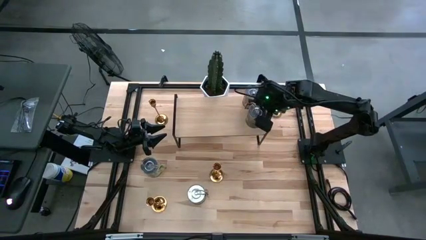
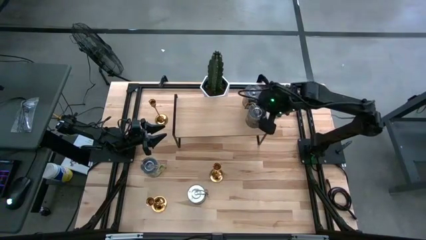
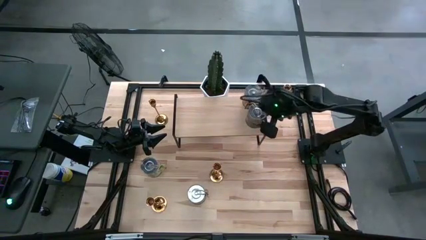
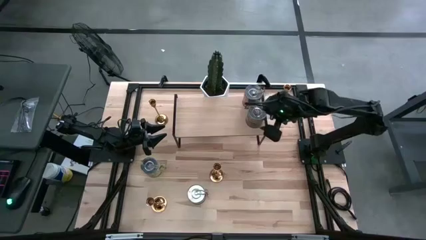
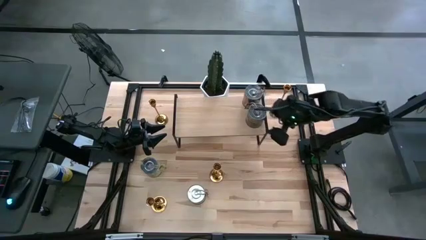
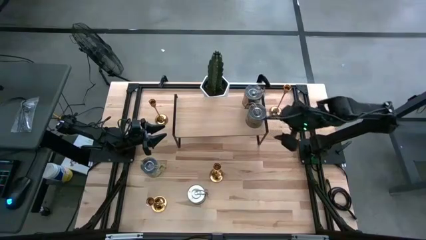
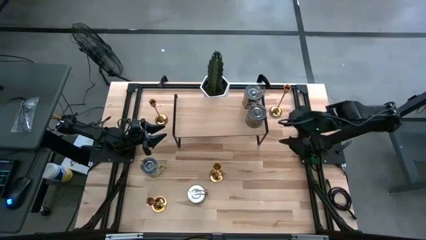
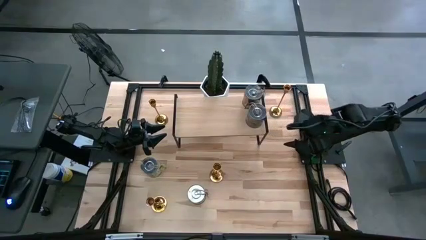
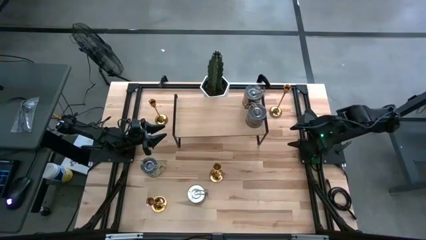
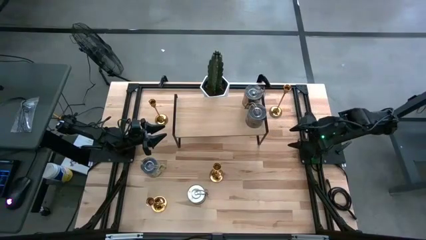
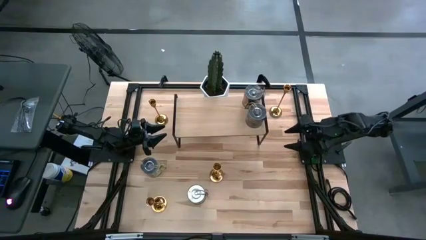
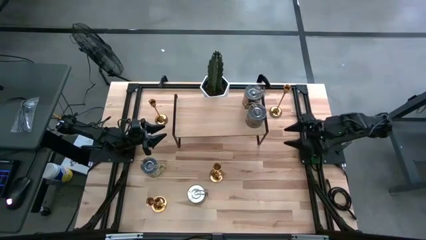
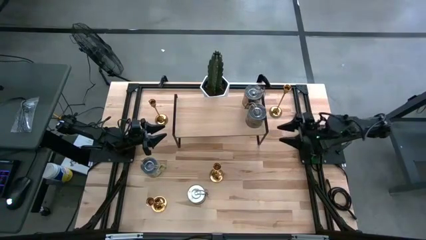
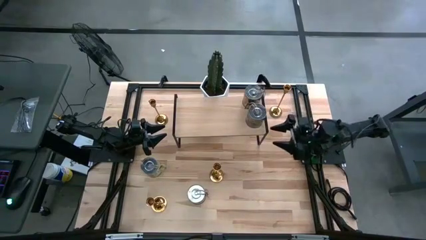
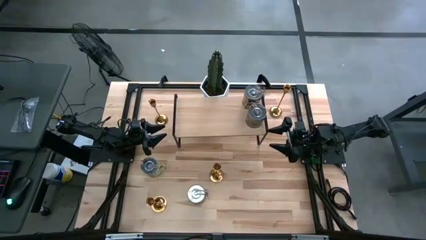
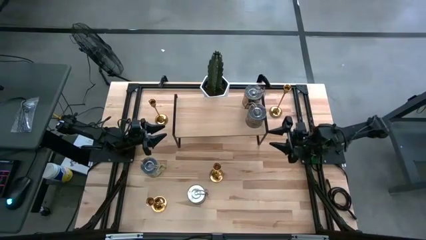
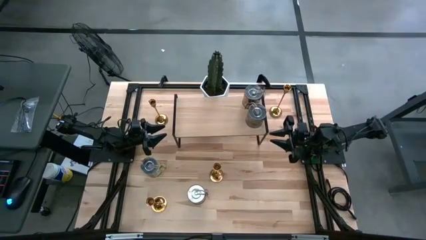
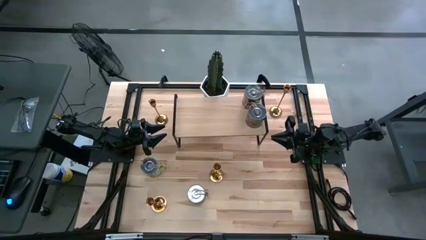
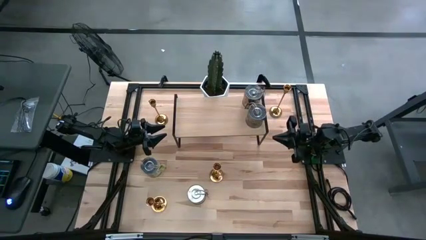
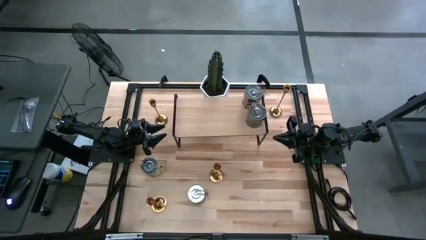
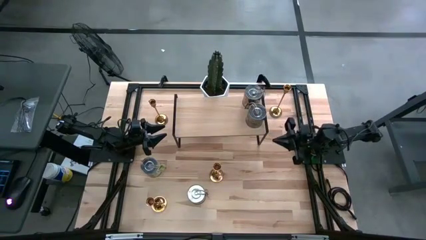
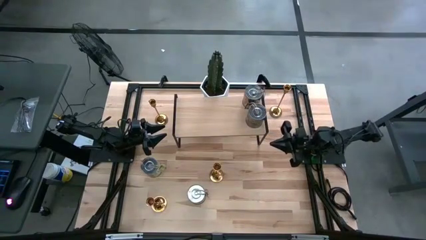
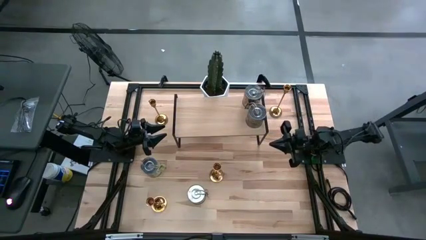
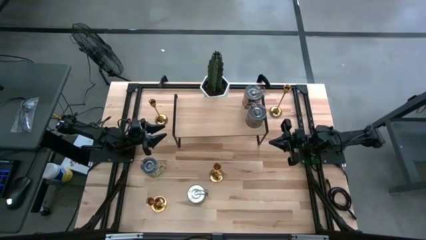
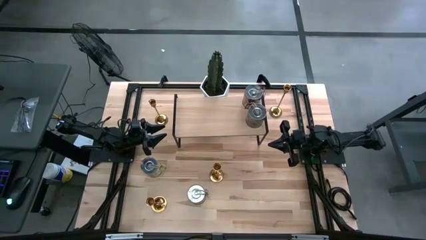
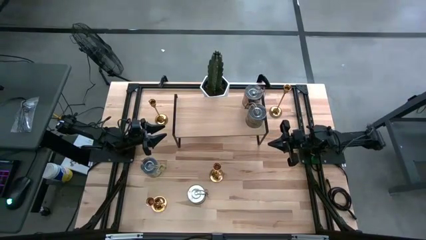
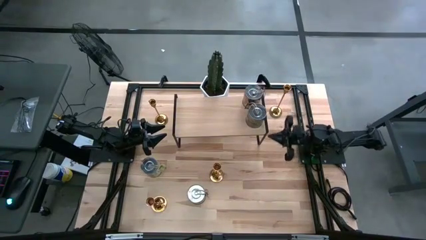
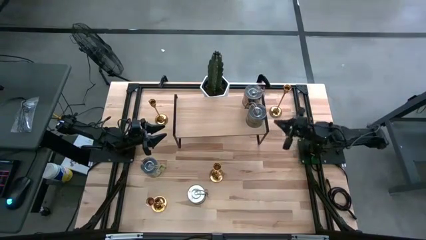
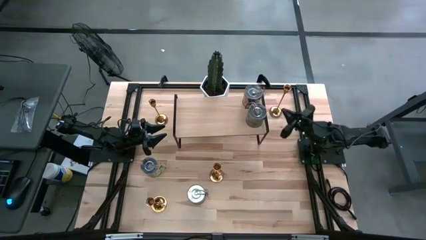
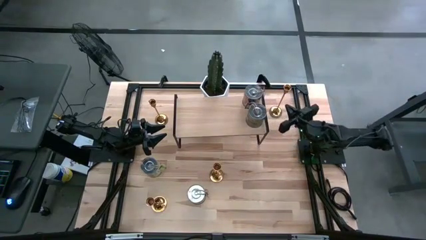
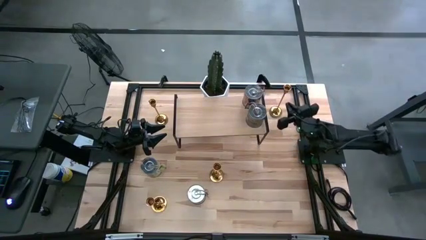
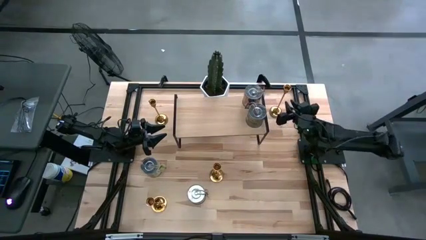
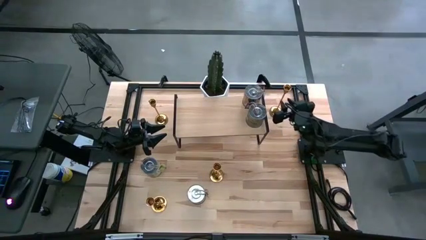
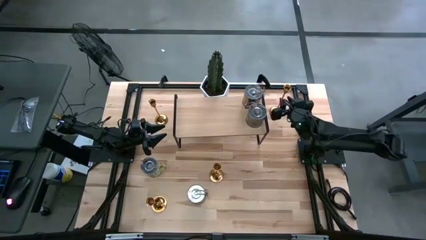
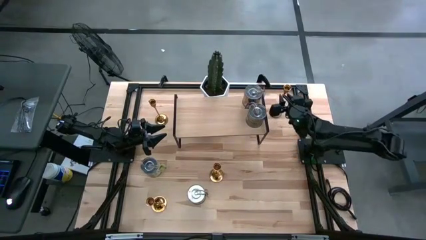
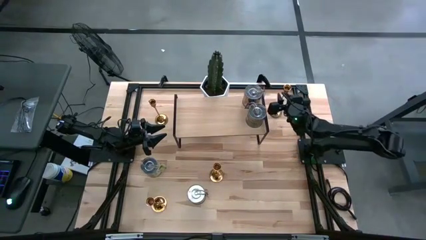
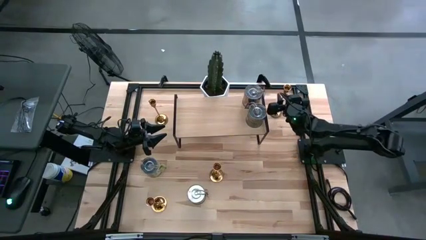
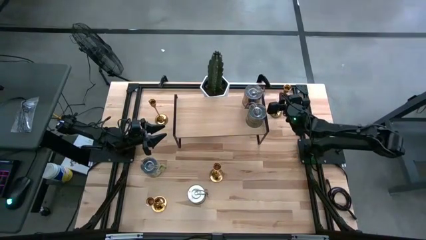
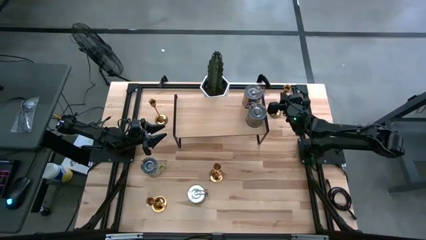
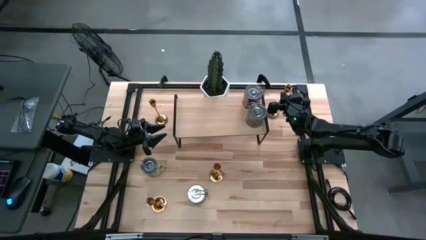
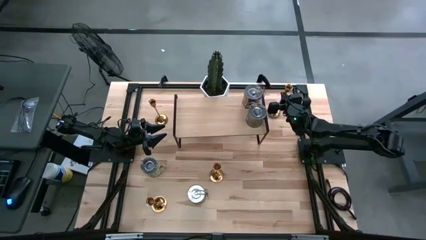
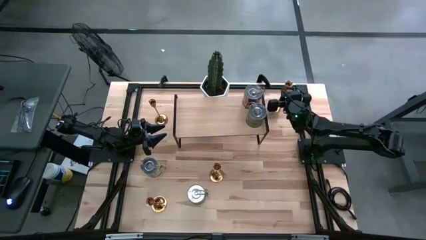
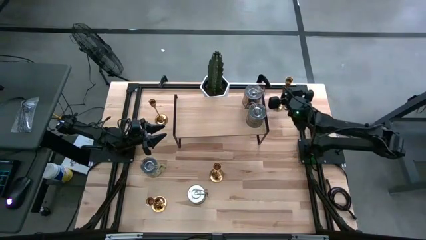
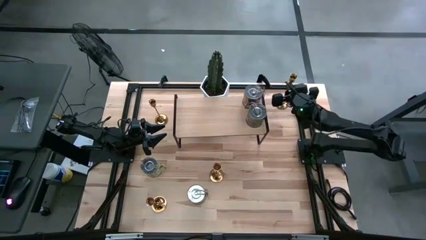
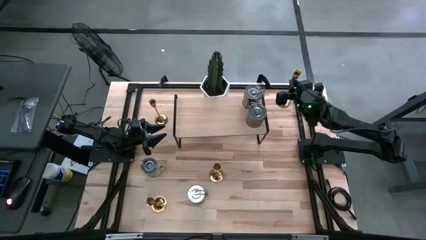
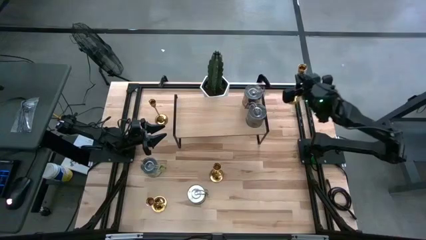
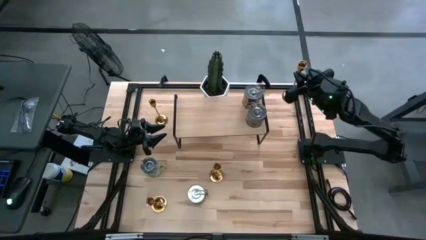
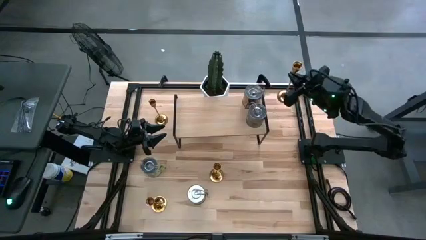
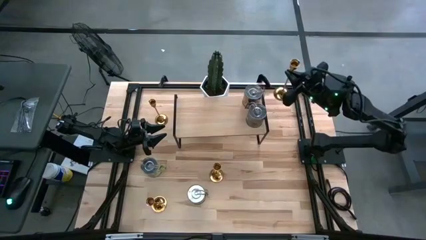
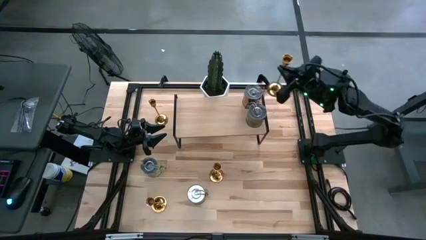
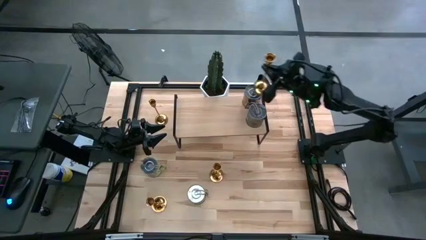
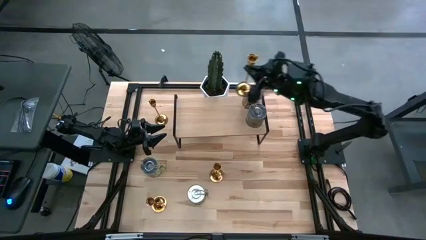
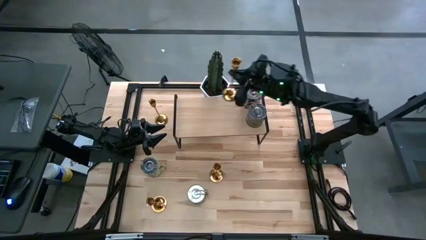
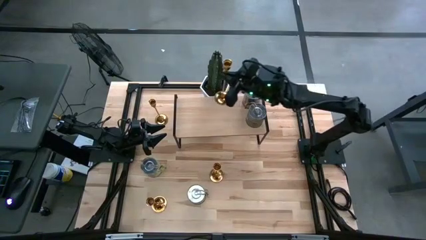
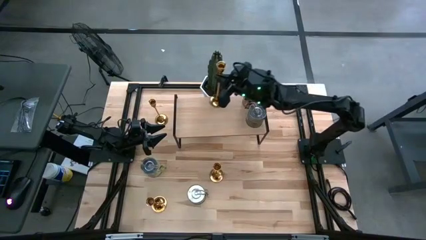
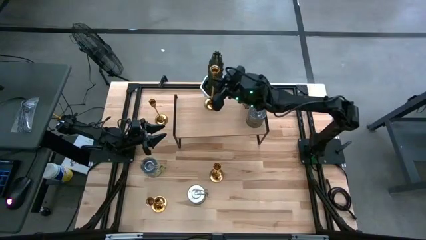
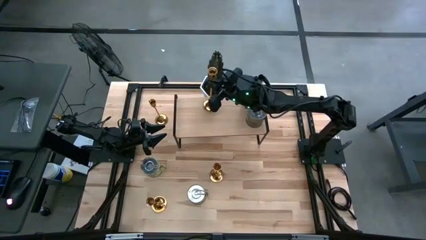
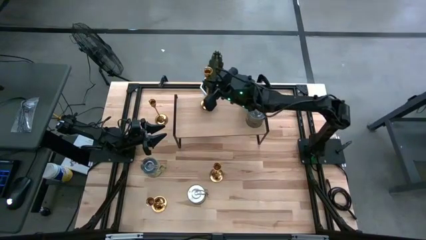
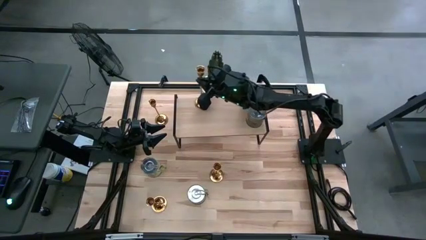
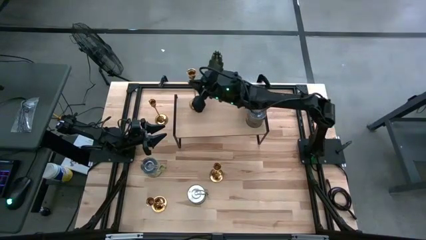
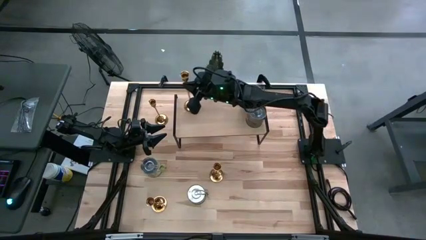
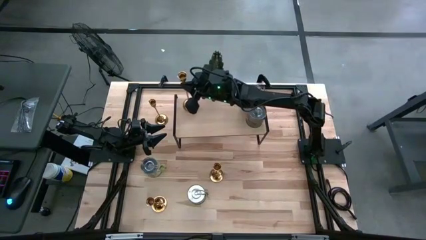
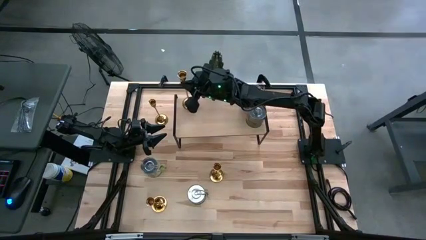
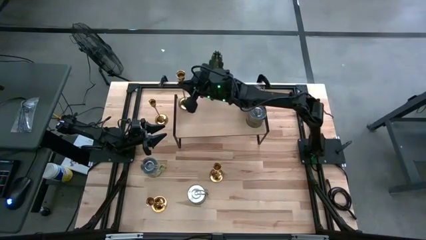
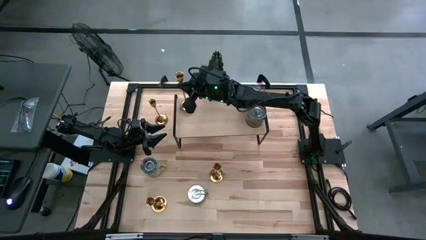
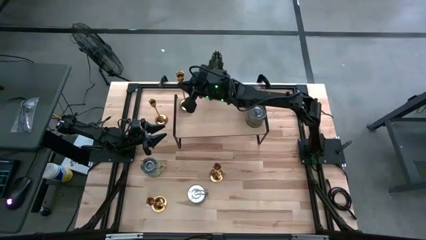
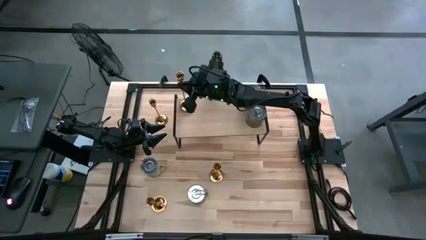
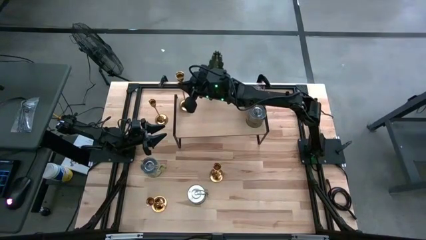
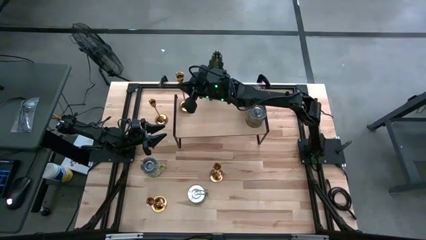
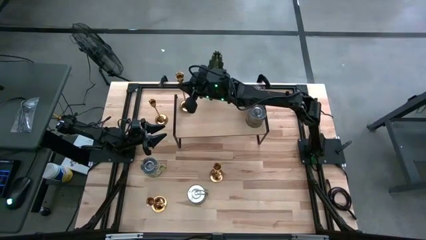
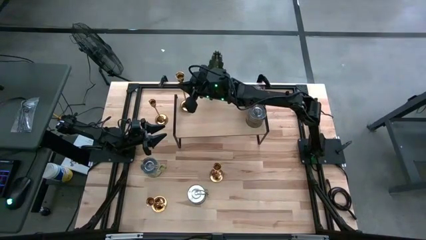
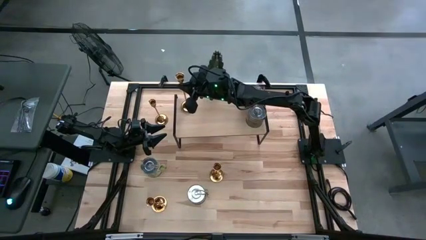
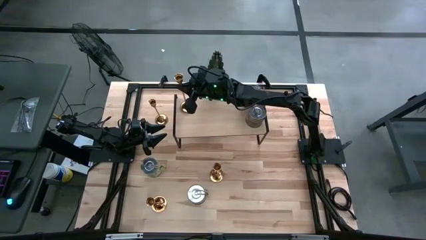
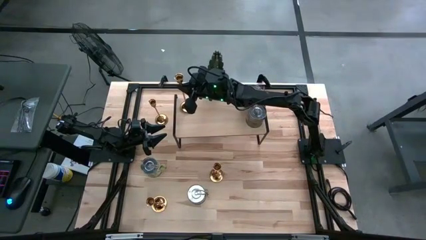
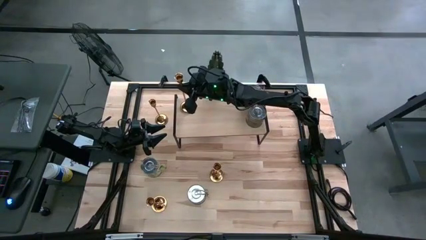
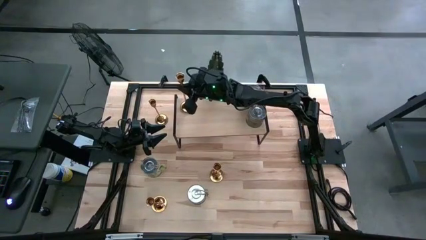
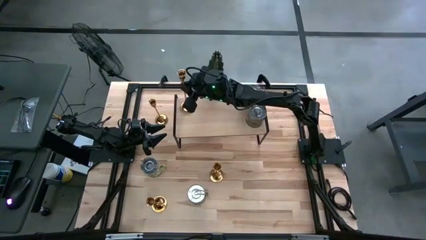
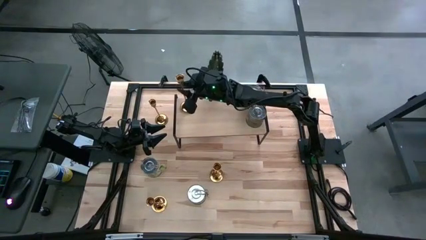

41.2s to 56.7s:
Task: Pick & Place candle stick holders
Put the gold candle holder on the shelf
